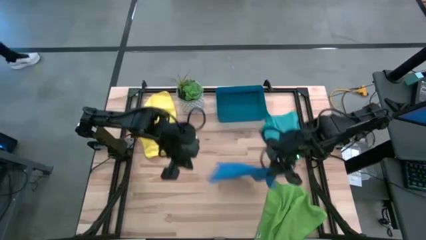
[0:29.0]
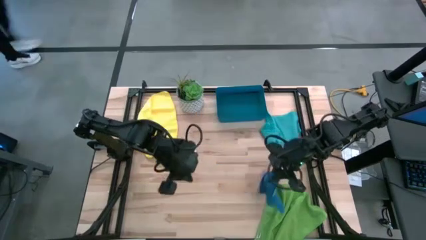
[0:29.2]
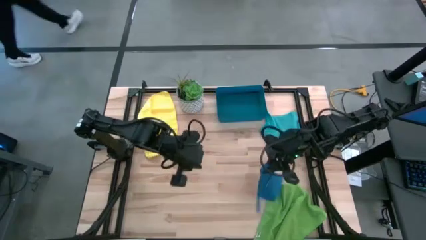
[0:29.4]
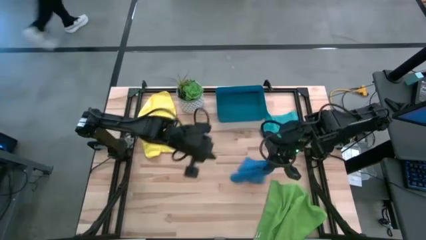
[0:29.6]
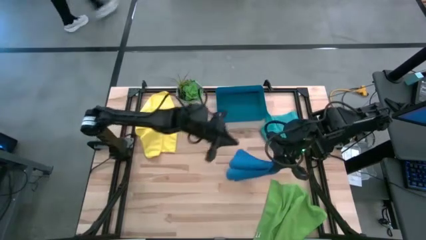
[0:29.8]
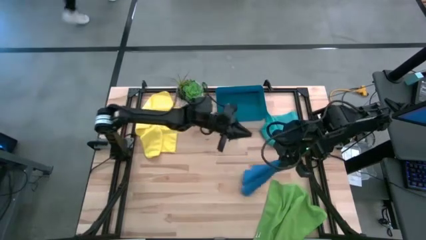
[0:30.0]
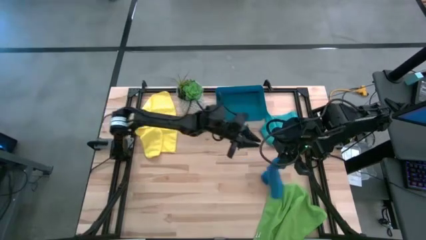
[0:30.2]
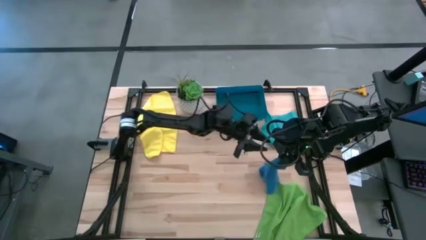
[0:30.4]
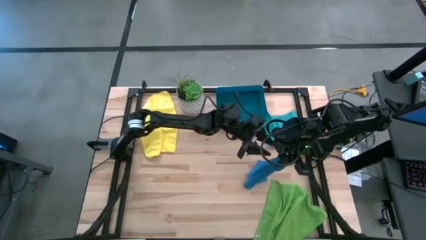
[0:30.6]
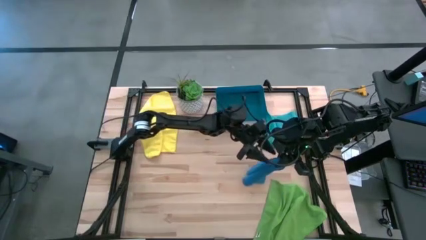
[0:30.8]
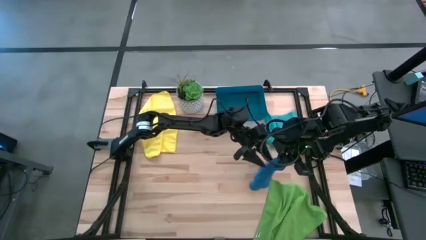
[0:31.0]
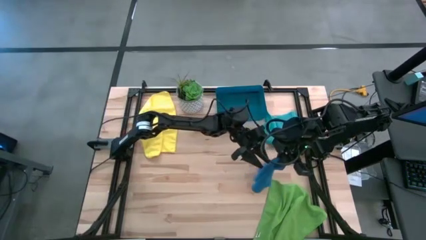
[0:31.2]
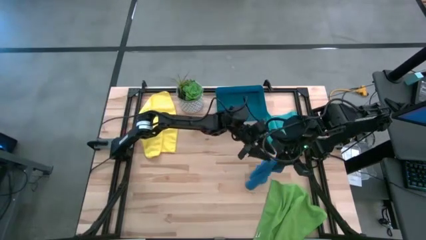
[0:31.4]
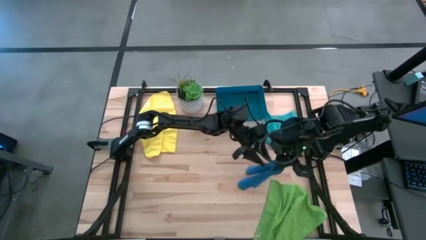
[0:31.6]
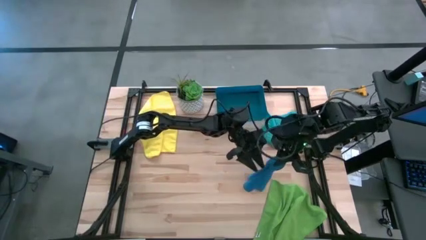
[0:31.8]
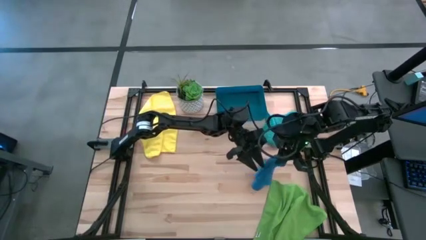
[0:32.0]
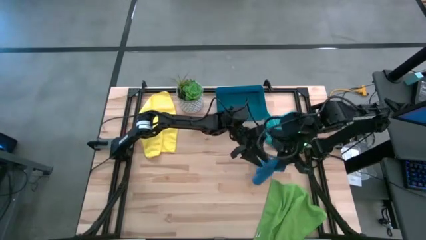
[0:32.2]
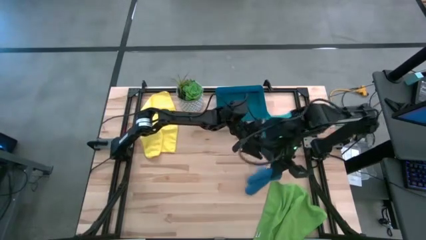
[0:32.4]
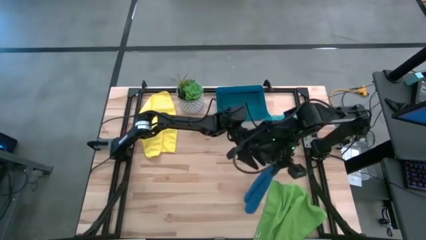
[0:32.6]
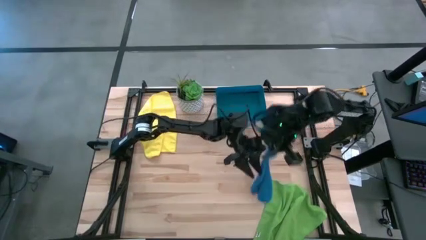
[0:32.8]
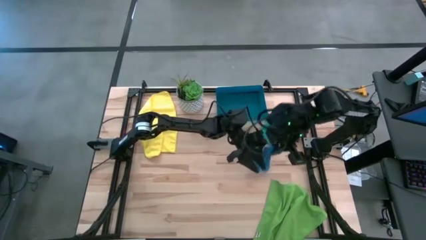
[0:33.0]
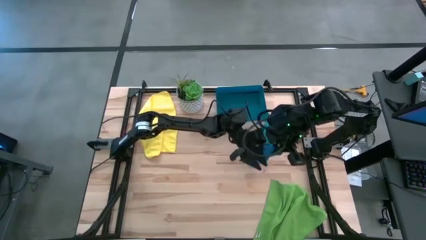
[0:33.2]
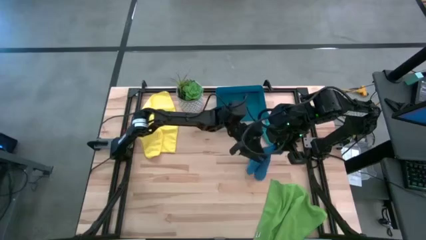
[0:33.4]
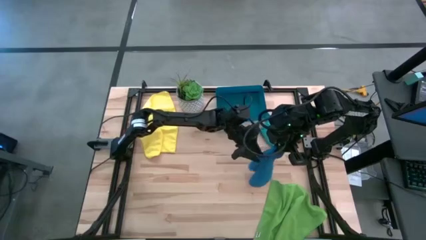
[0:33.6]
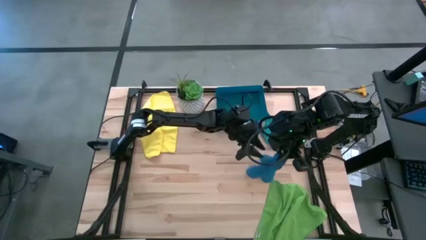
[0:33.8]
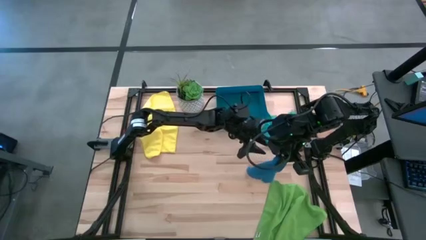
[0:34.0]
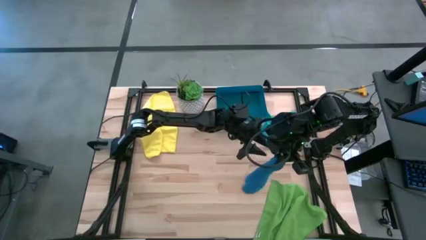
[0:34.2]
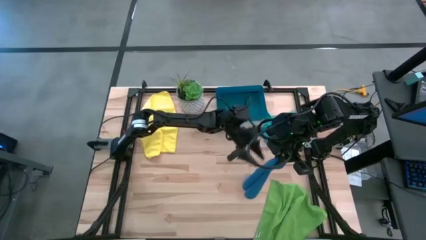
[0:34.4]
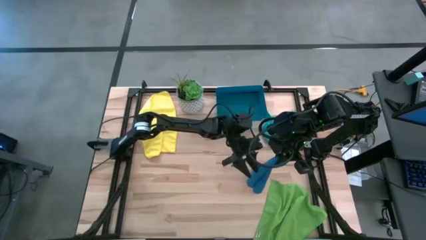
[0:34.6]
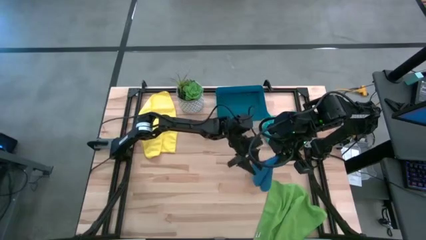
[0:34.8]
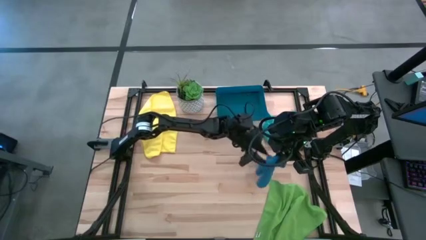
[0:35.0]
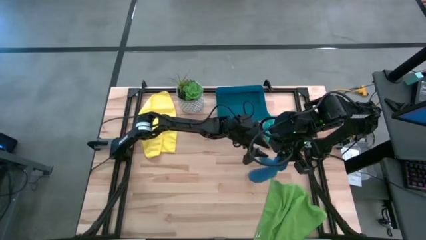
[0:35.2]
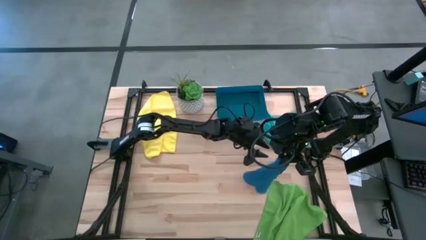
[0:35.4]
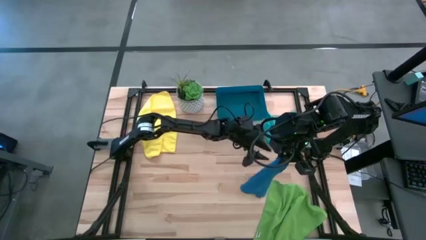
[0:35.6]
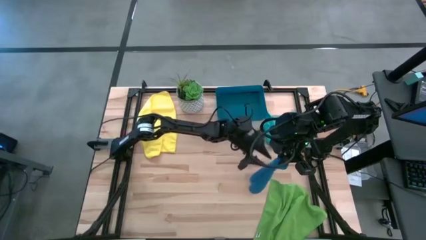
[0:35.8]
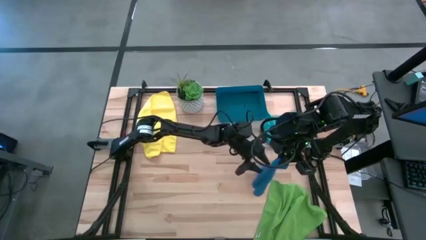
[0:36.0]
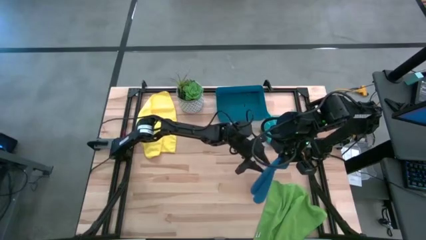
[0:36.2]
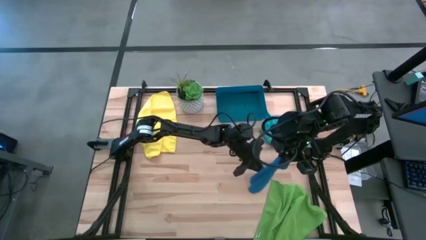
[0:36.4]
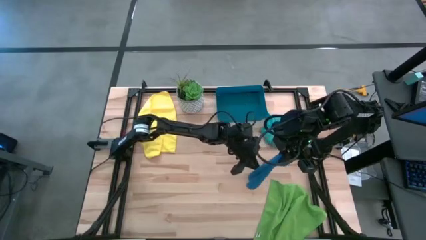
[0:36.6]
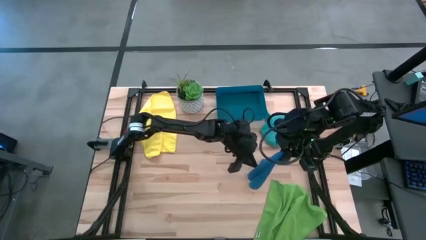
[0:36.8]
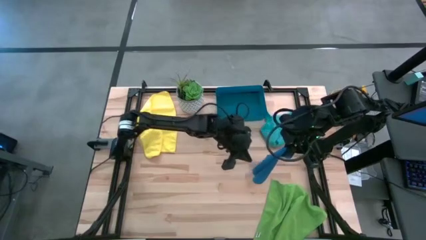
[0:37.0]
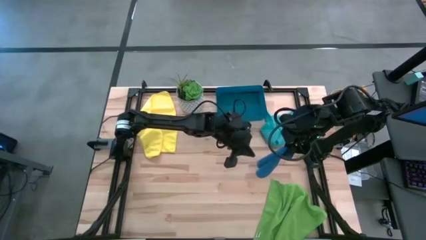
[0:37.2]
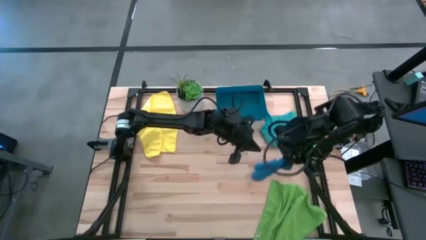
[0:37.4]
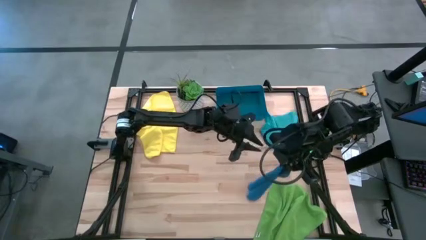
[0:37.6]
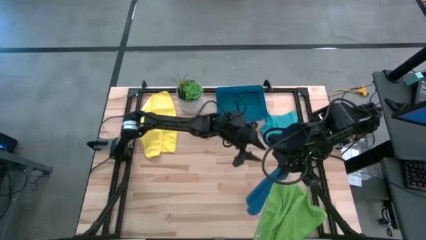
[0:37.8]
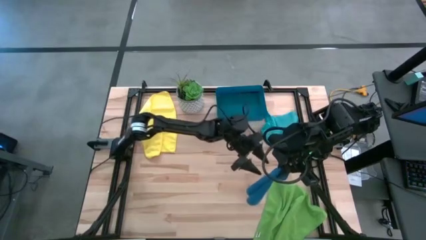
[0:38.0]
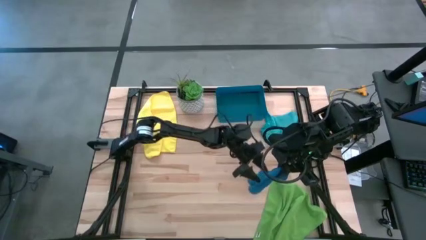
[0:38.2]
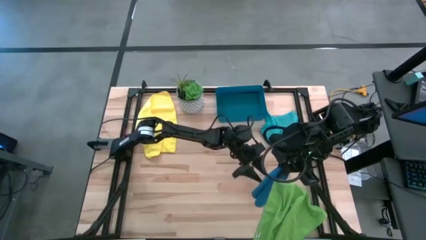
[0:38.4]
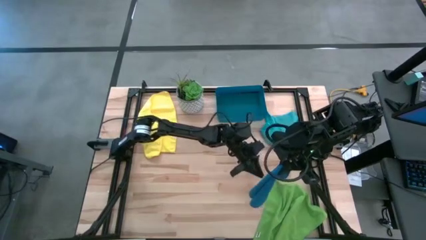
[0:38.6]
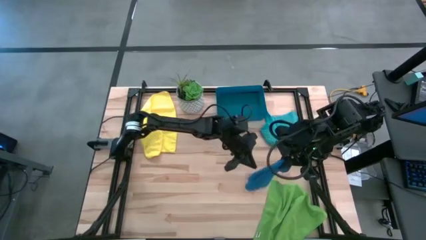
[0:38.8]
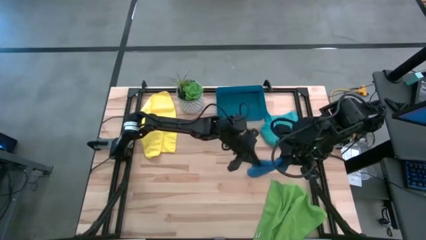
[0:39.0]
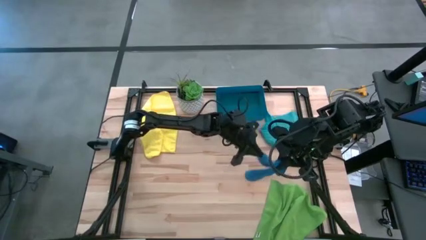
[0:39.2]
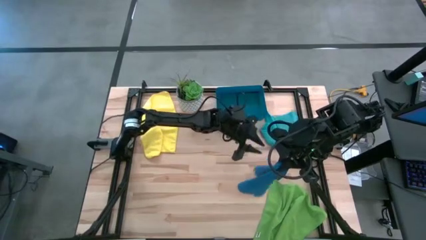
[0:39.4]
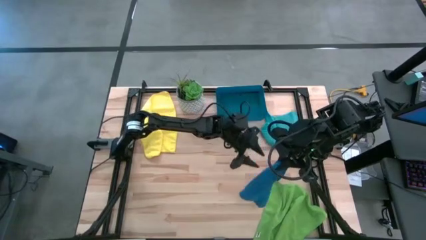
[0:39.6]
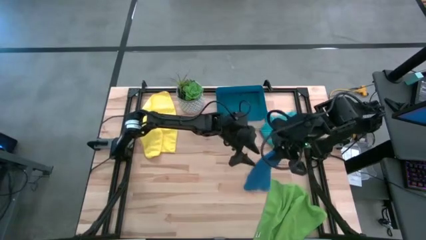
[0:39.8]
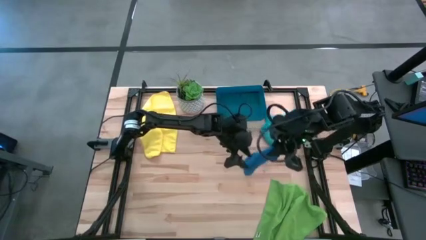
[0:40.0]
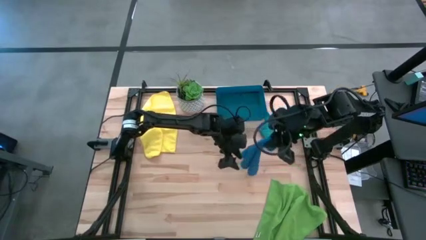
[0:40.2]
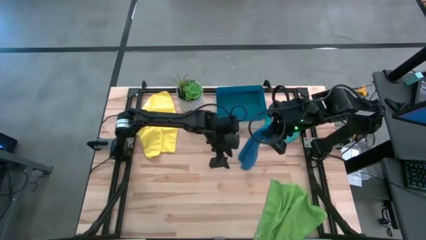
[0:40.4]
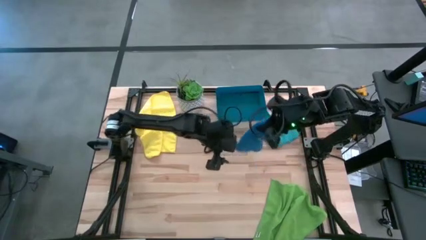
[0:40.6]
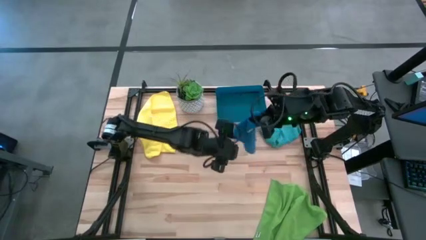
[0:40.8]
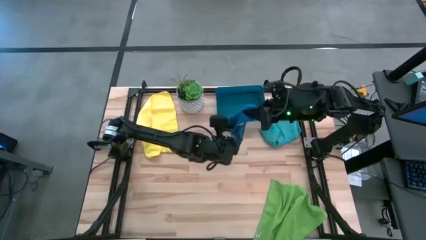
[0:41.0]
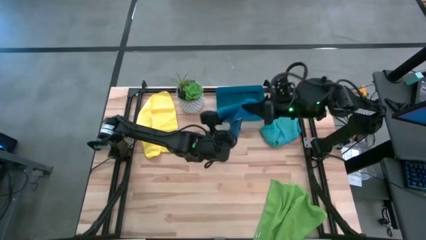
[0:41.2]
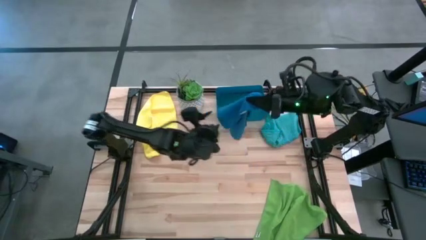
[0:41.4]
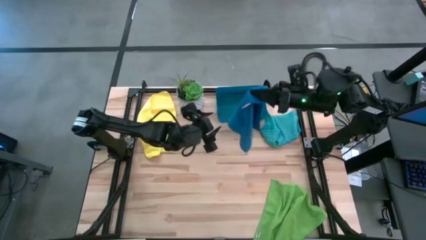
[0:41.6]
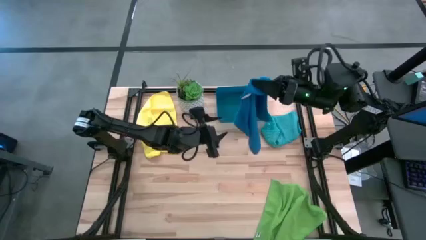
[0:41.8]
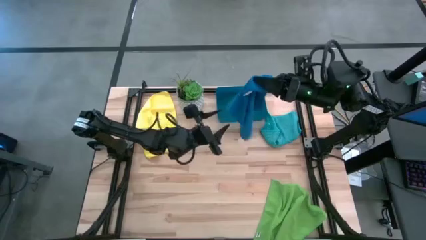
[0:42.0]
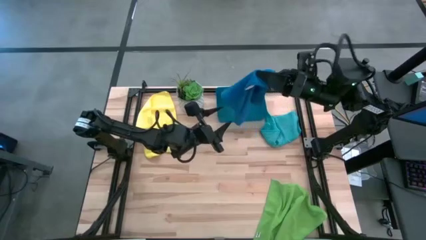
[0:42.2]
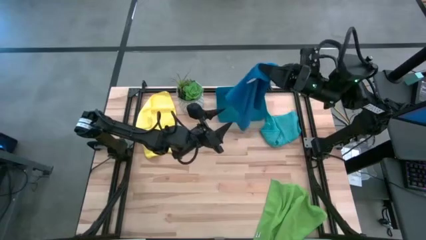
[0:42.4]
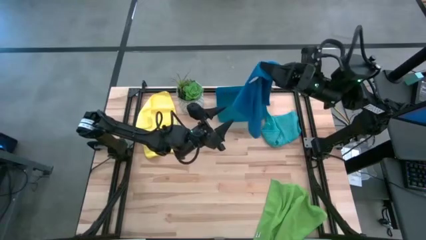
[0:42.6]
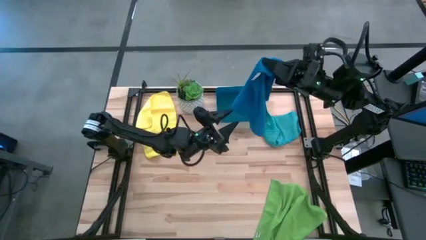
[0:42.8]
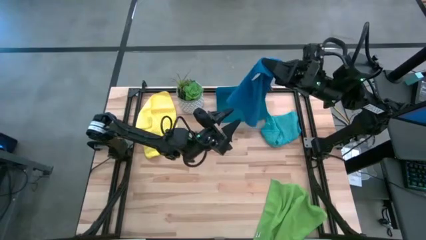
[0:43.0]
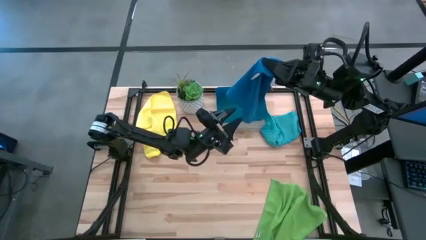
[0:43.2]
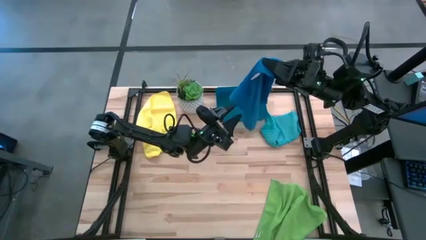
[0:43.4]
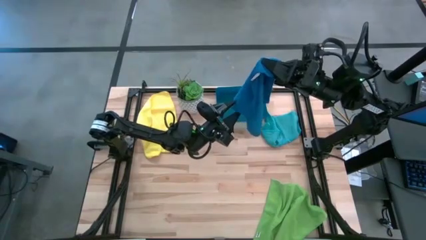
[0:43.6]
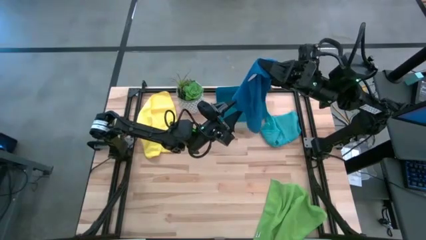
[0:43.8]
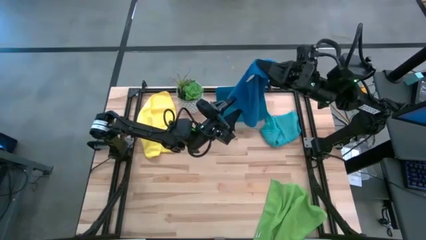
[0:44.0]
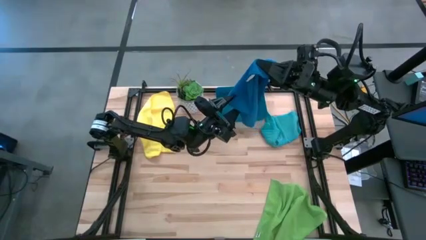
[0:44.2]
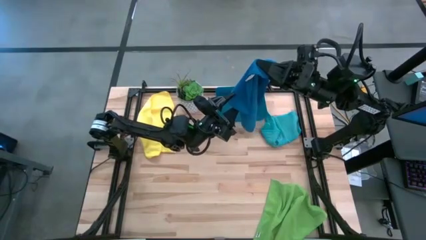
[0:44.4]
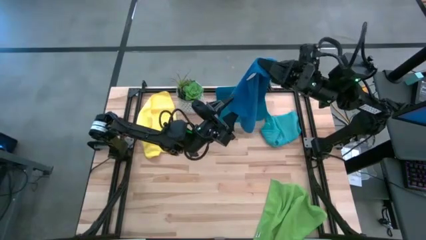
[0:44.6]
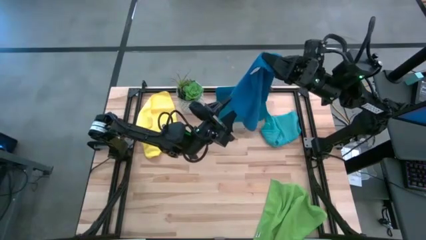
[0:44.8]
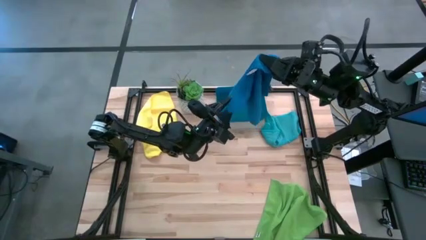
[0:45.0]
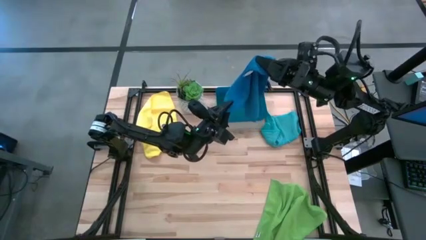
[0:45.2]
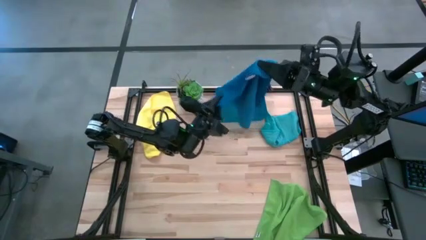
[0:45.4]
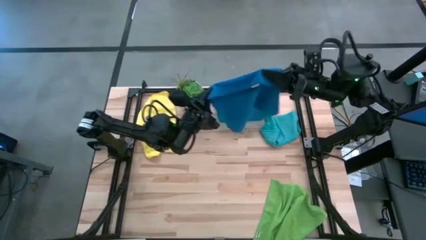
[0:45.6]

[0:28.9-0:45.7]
Task: Fold microfiber towels
Fold the dark blue microfiber towel into the dark blue bin
